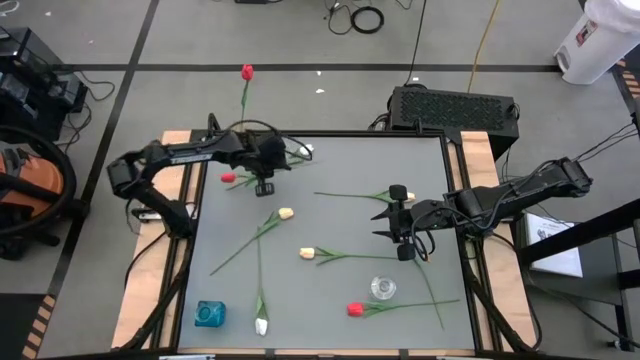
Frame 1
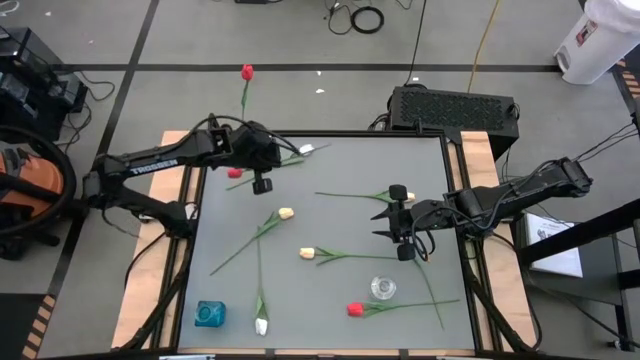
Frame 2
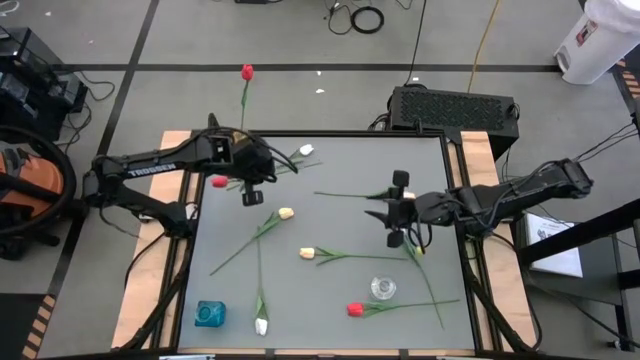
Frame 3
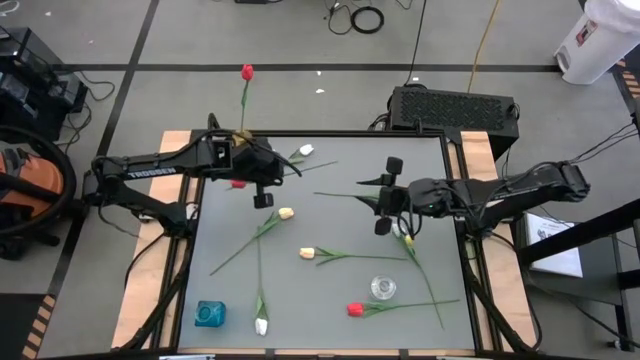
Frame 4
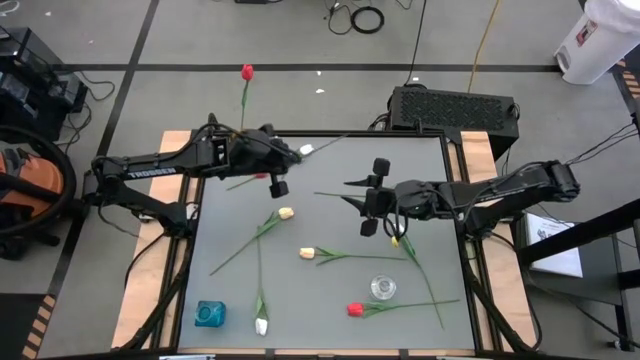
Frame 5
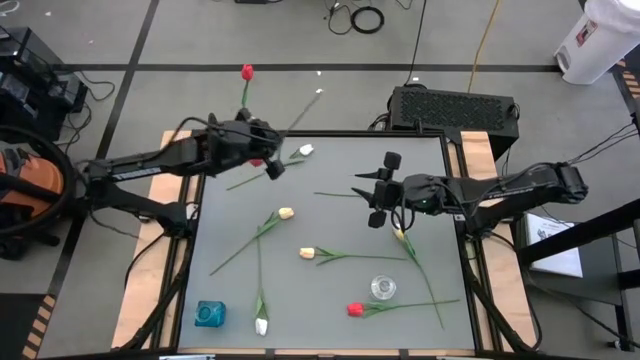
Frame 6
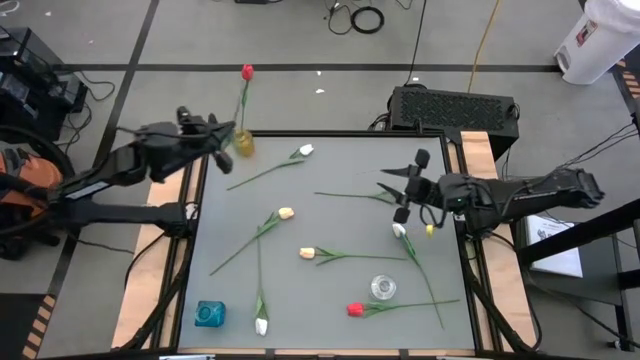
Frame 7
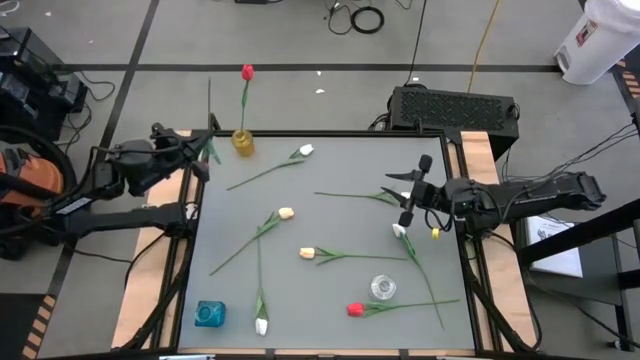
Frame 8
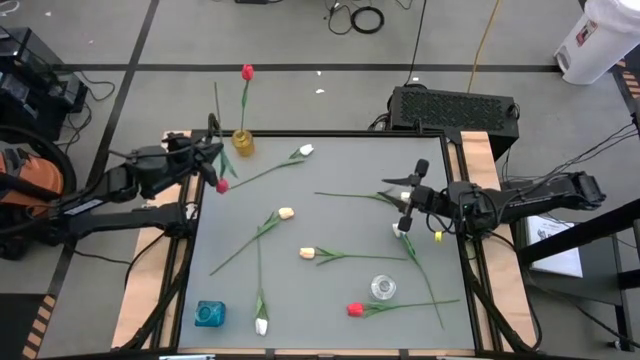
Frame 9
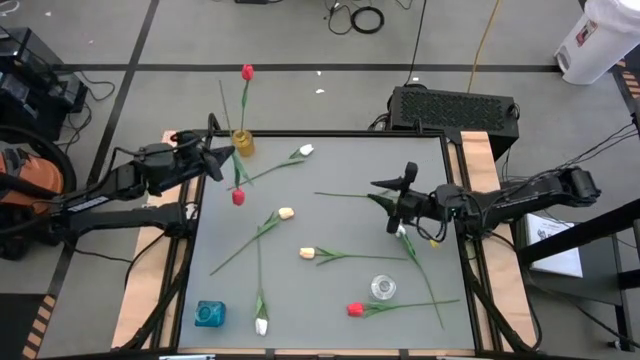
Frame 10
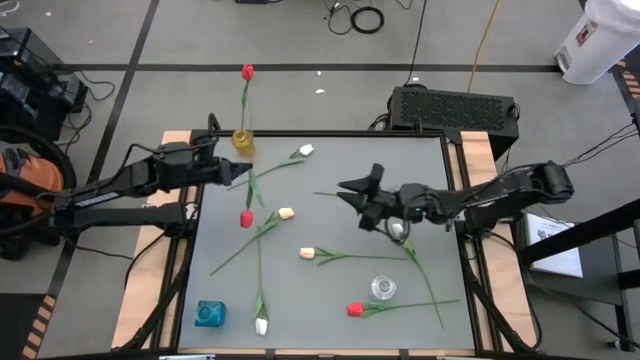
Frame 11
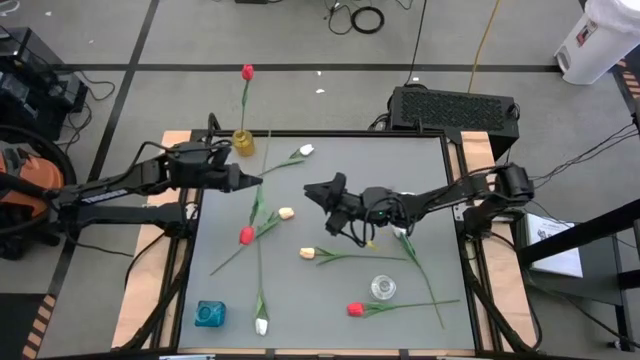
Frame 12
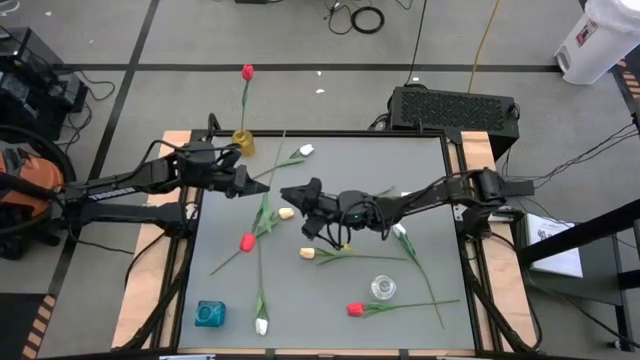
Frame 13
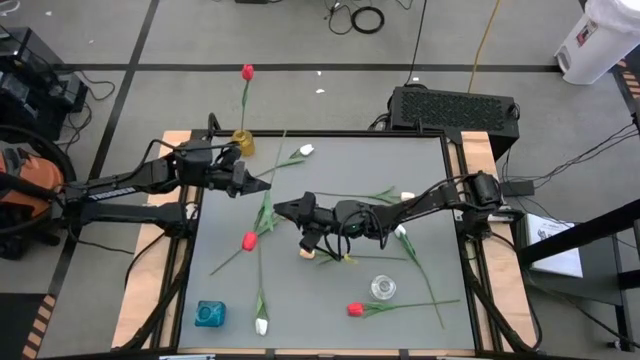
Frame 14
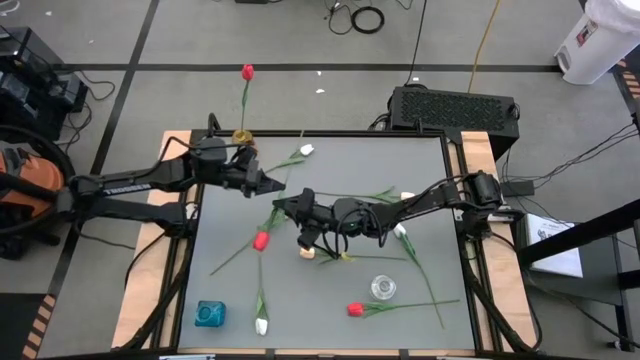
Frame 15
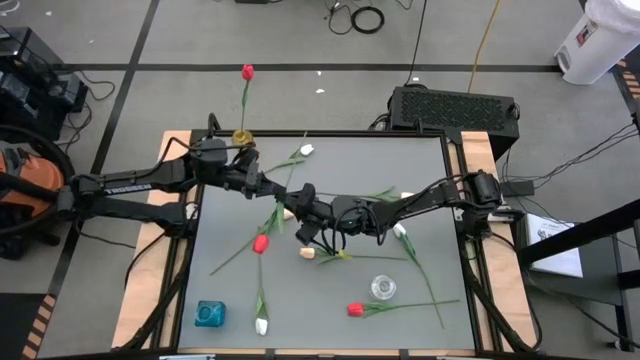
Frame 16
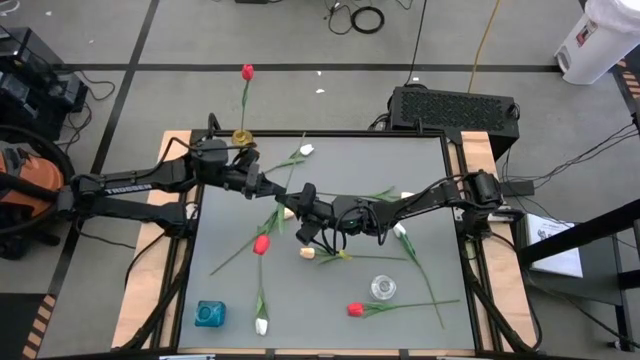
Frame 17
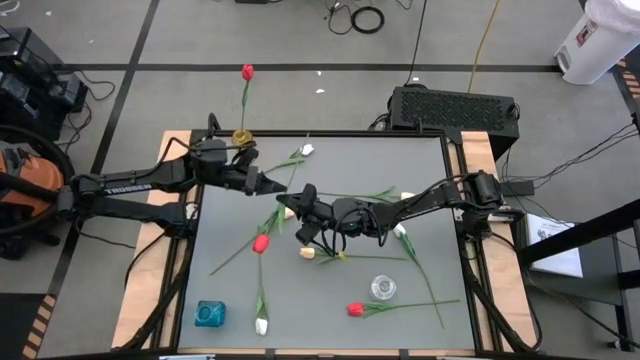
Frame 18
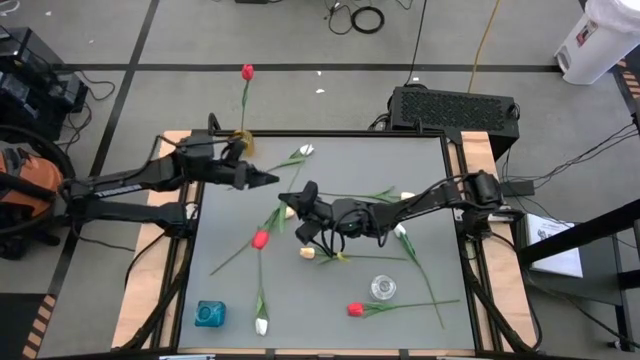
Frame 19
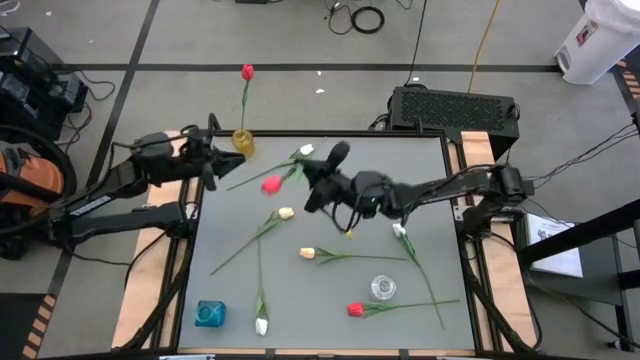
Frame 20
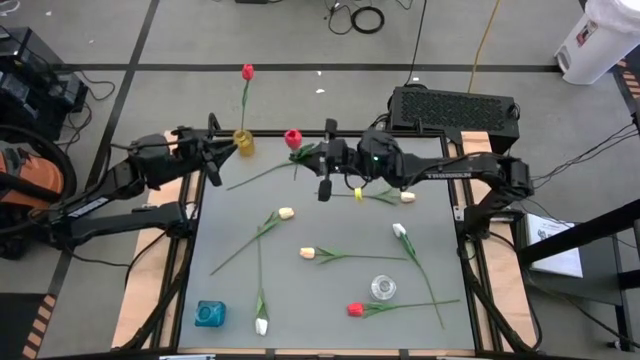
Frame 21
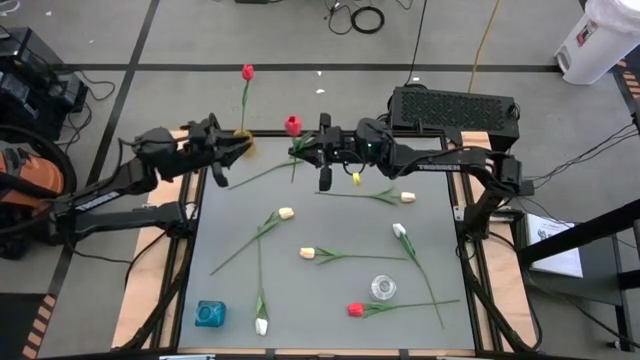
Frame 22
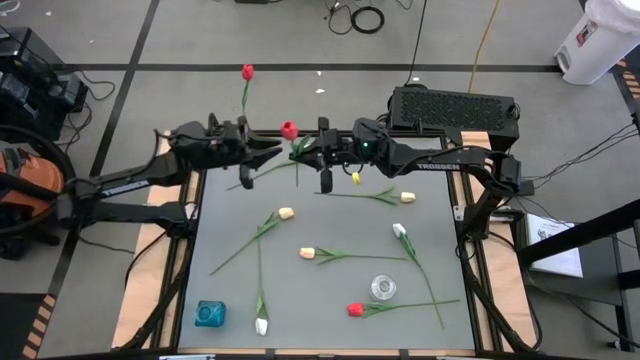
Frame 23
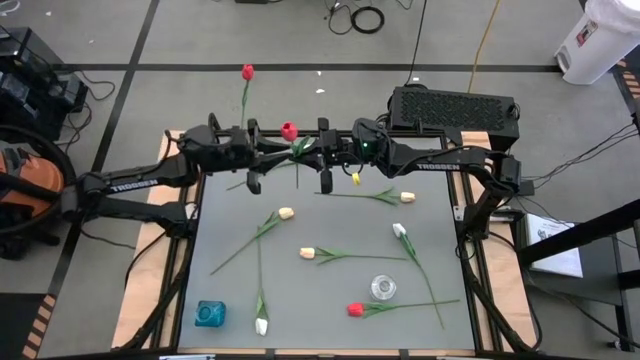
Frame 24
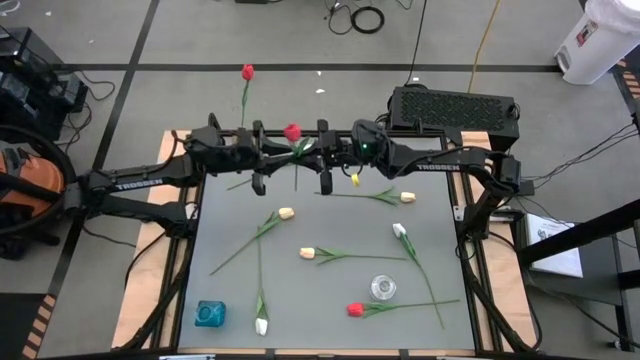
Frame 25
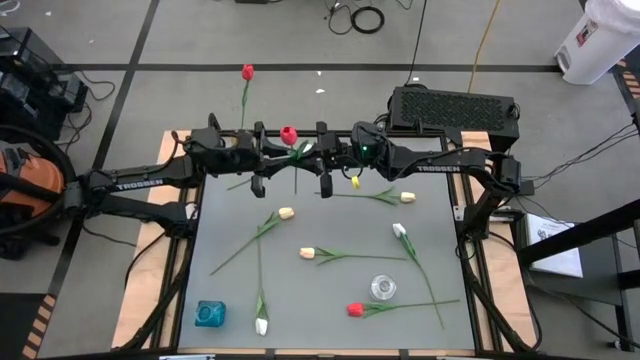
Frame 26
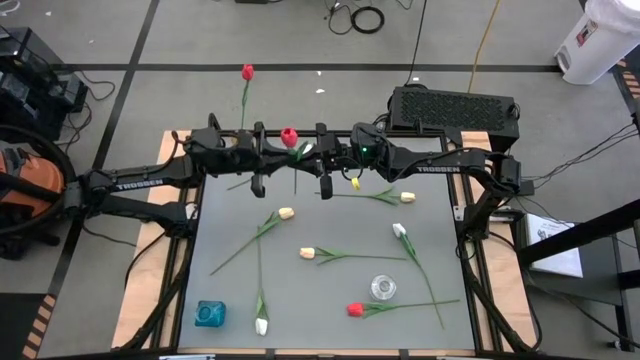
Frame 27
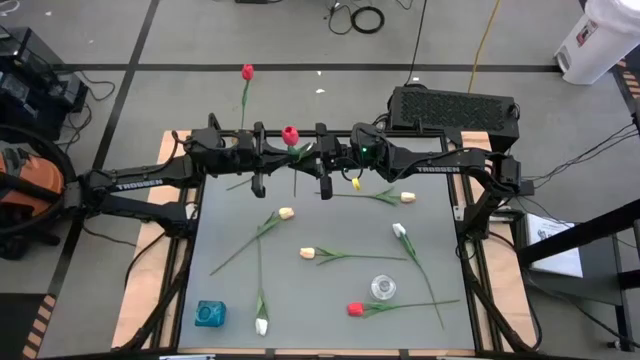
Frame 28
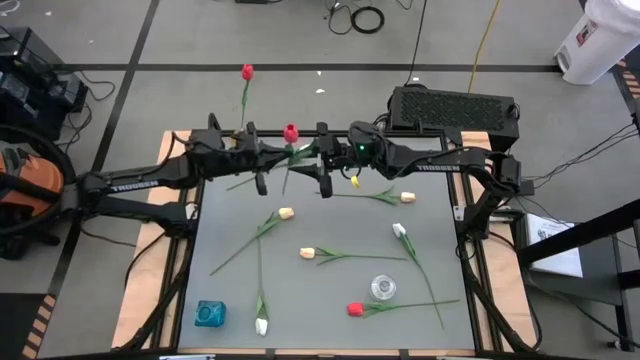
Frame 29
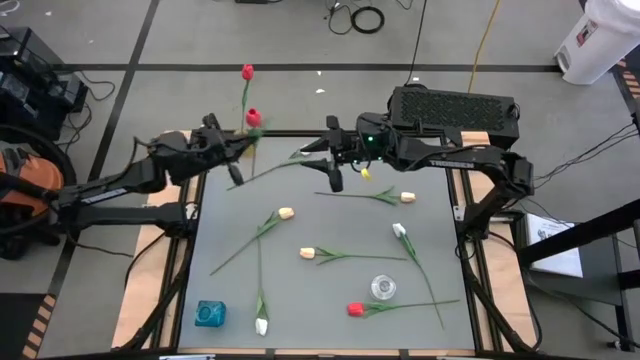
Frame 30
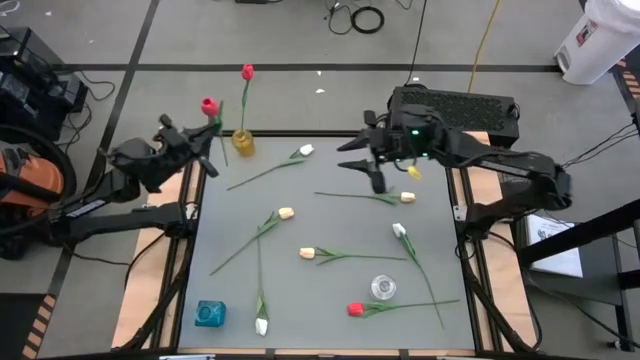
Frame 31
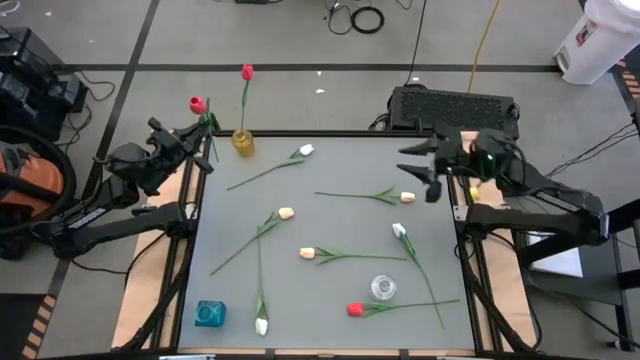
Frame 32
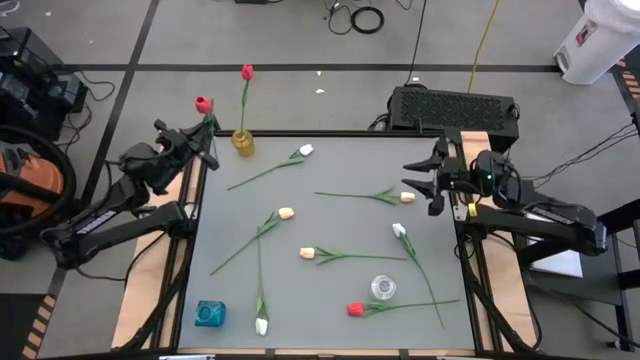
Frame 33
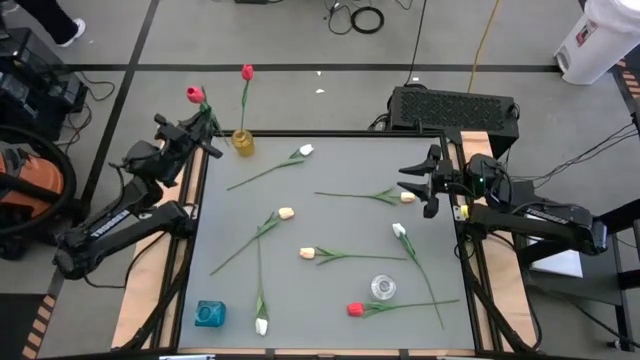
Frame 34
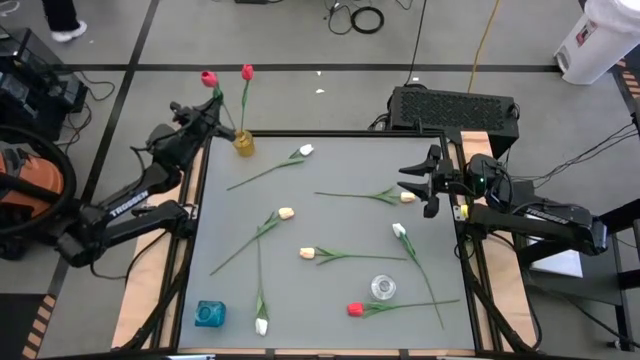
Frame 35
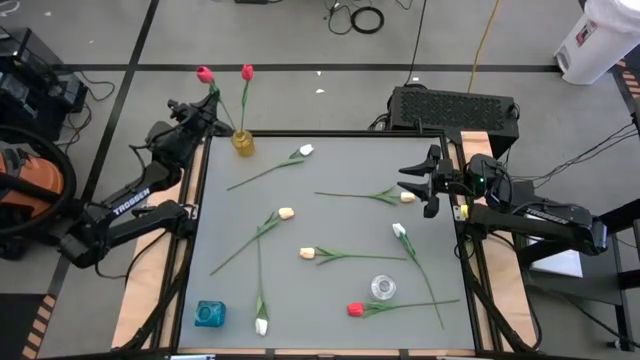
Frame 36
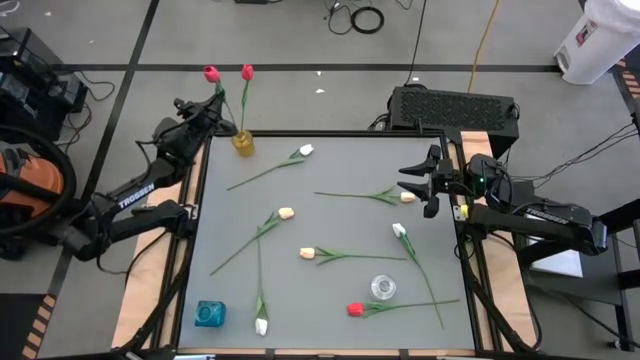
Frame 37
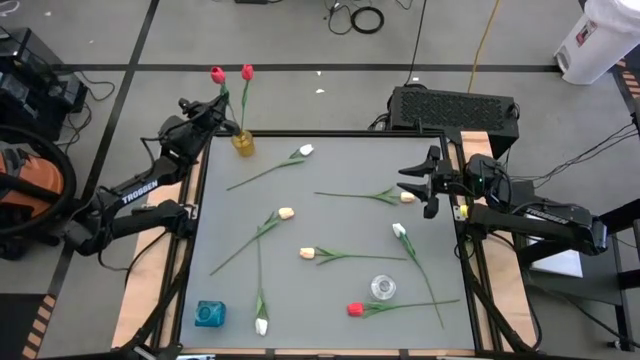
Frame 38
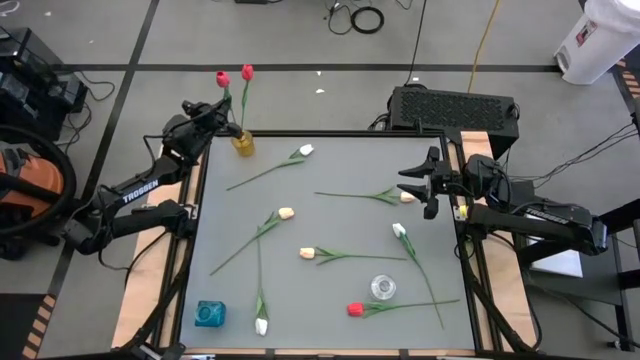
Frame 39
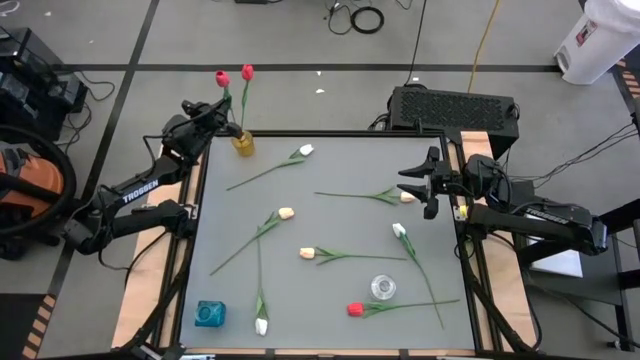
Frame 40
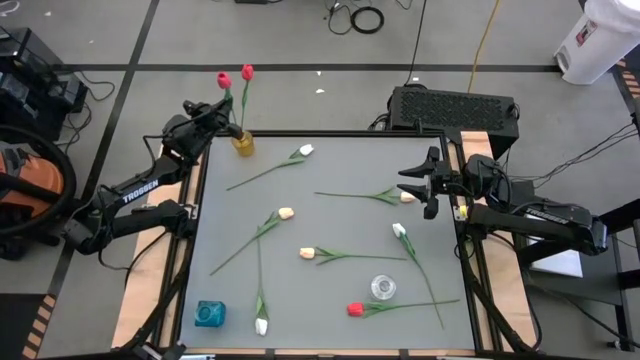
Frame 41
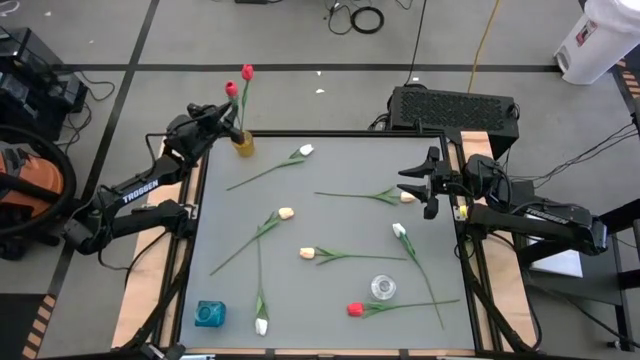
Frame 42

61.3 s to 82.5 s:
Task: Sort flowers into vase by color
Put the top red tulip into the yellow vase
